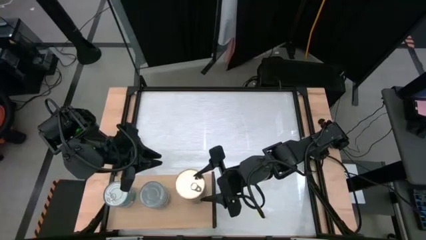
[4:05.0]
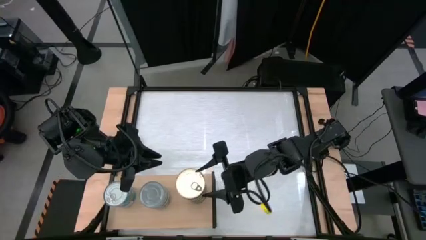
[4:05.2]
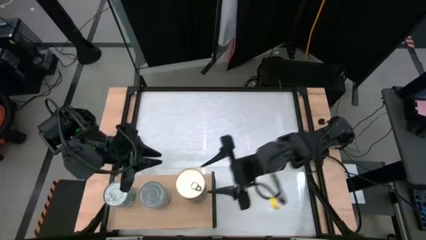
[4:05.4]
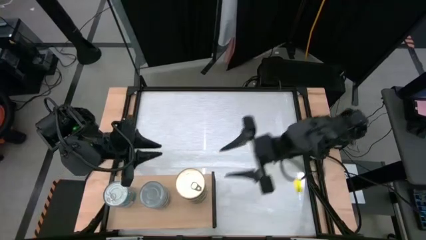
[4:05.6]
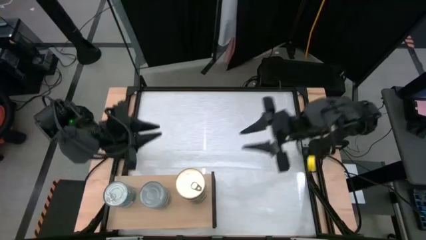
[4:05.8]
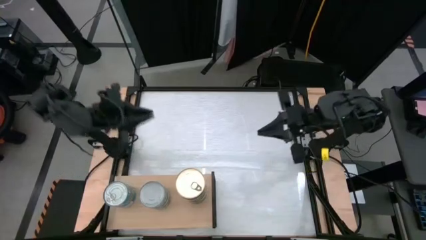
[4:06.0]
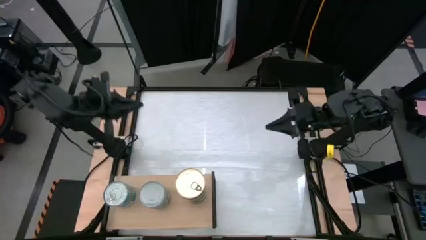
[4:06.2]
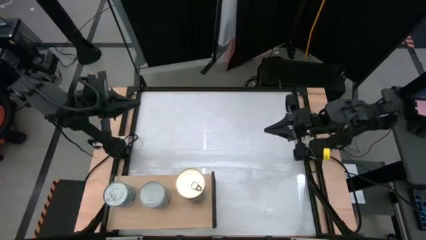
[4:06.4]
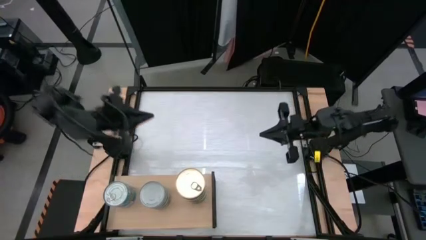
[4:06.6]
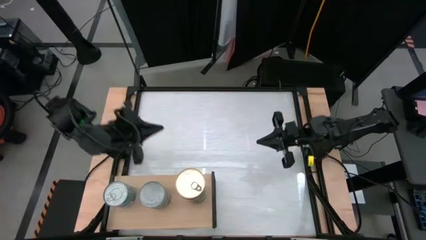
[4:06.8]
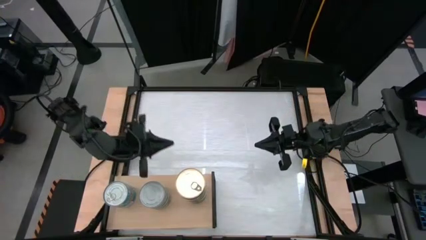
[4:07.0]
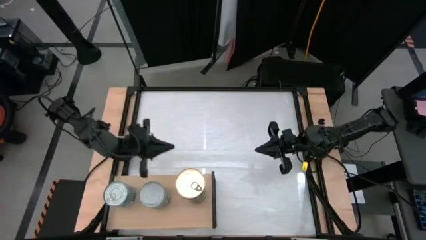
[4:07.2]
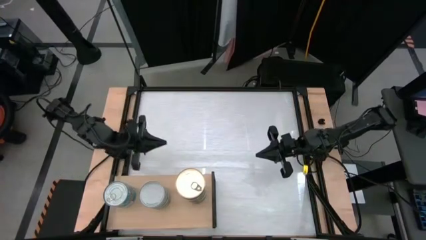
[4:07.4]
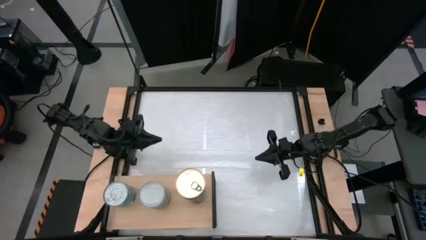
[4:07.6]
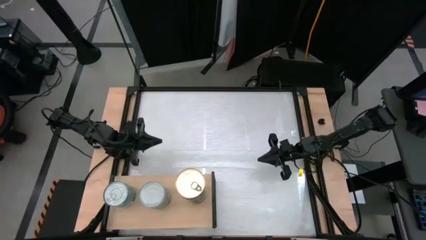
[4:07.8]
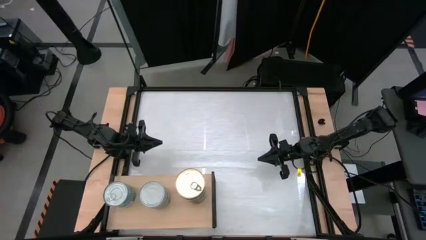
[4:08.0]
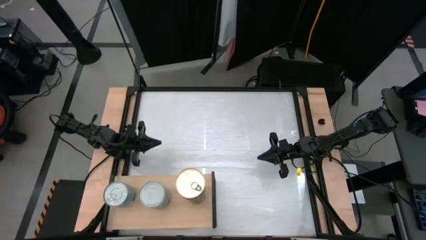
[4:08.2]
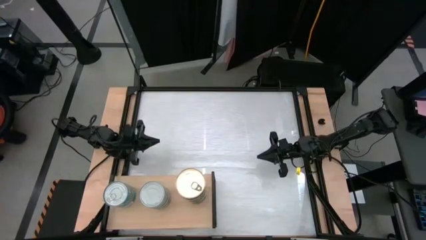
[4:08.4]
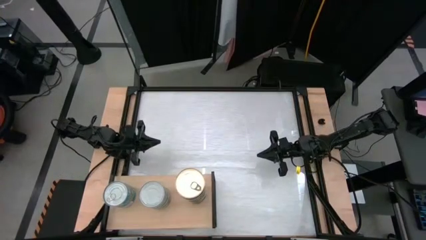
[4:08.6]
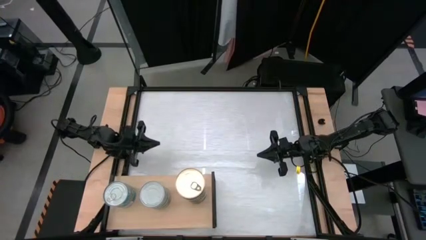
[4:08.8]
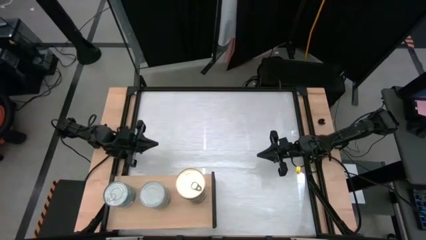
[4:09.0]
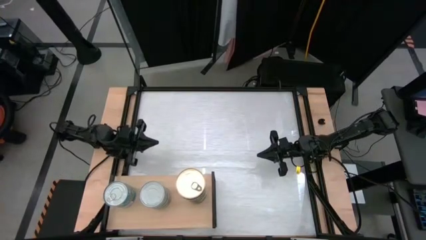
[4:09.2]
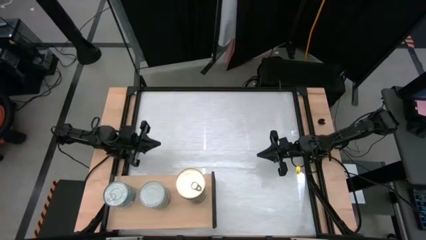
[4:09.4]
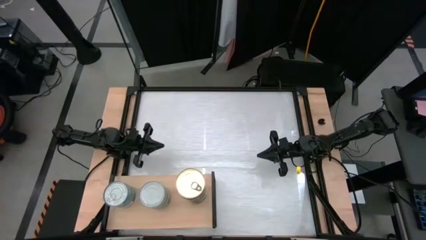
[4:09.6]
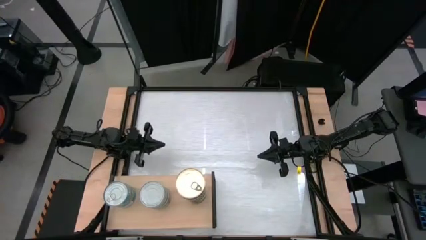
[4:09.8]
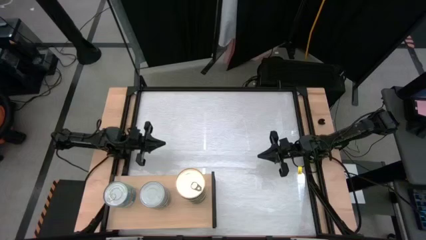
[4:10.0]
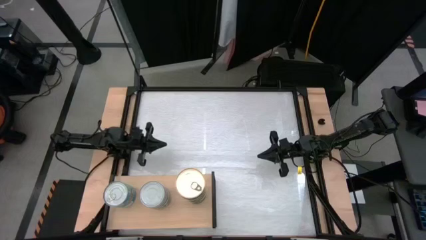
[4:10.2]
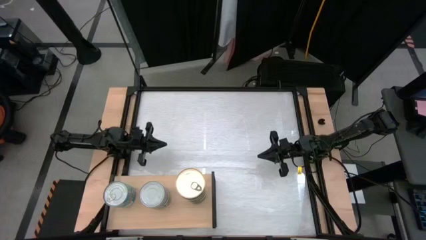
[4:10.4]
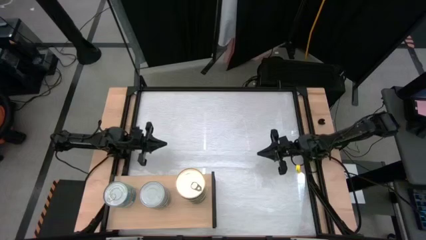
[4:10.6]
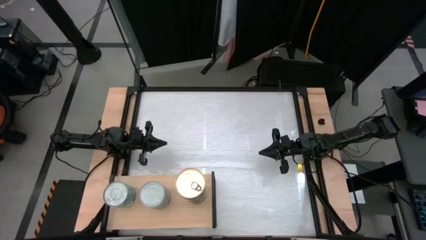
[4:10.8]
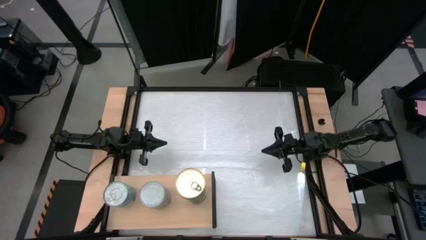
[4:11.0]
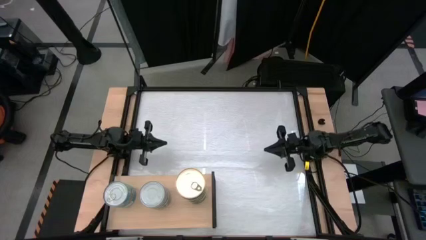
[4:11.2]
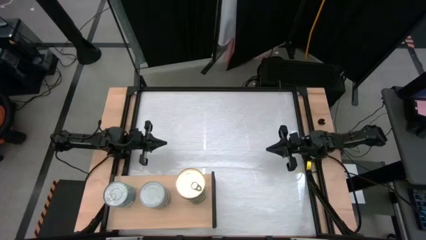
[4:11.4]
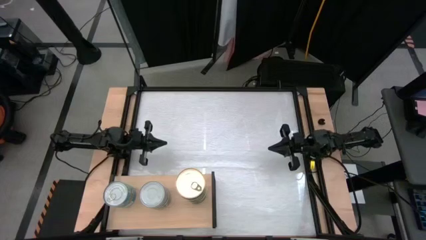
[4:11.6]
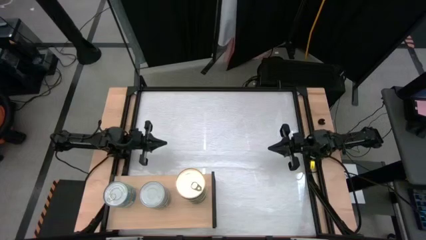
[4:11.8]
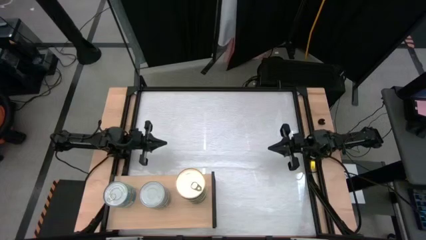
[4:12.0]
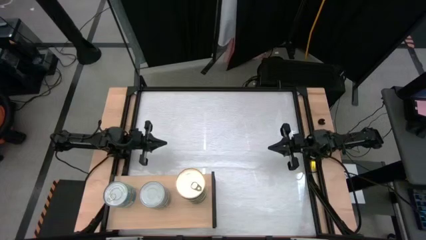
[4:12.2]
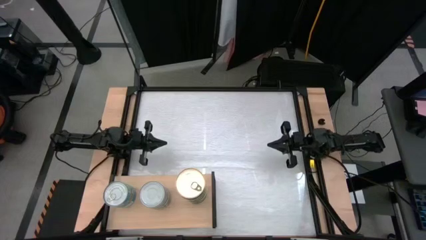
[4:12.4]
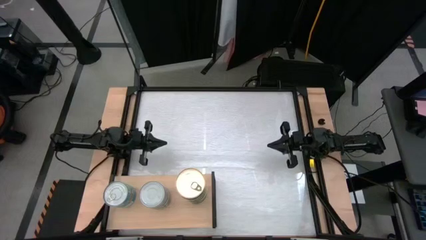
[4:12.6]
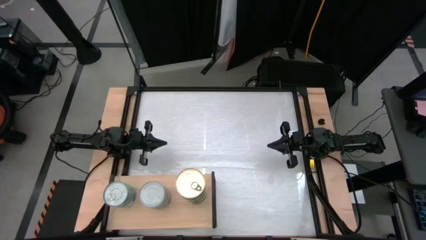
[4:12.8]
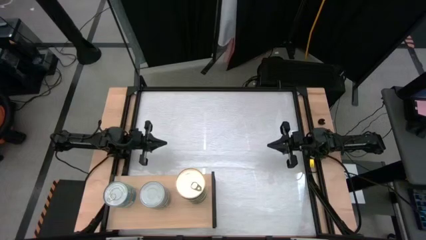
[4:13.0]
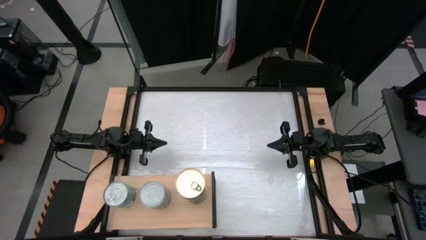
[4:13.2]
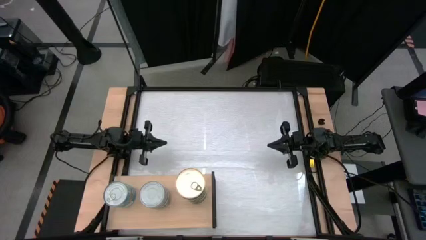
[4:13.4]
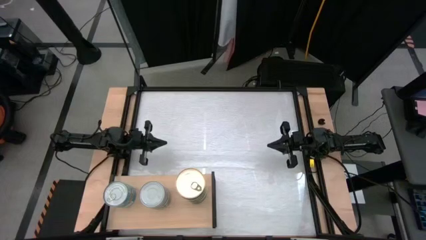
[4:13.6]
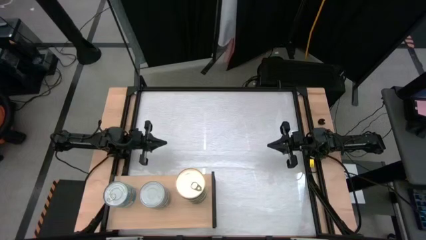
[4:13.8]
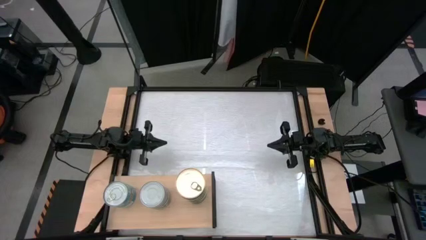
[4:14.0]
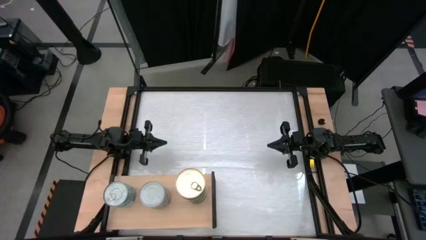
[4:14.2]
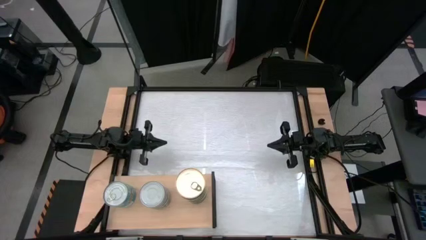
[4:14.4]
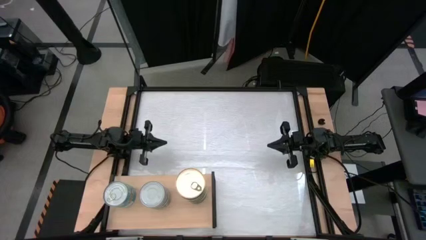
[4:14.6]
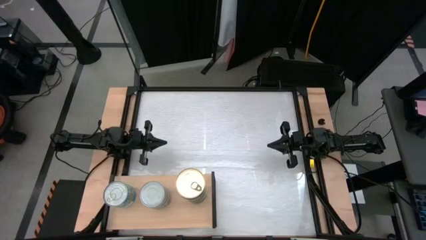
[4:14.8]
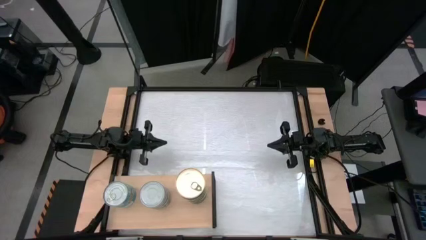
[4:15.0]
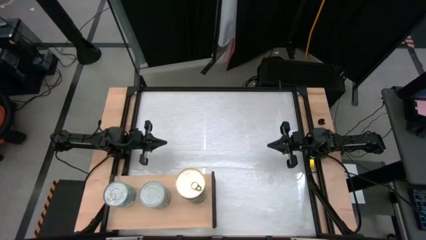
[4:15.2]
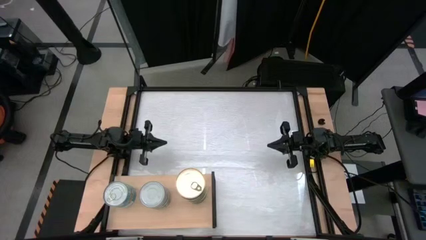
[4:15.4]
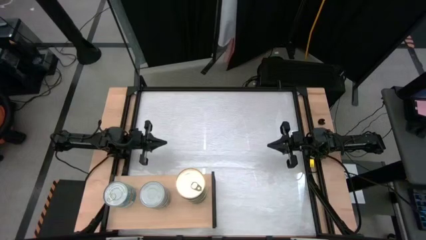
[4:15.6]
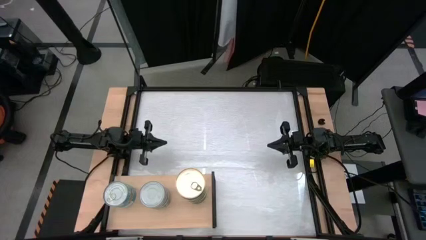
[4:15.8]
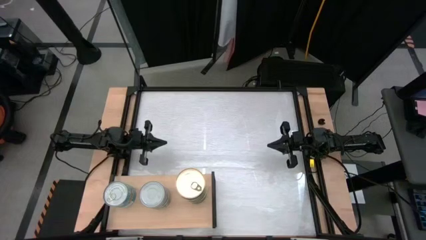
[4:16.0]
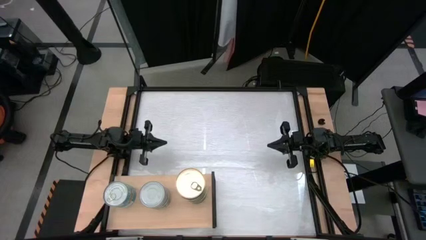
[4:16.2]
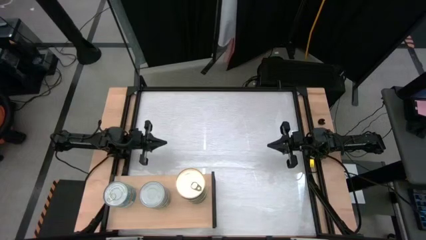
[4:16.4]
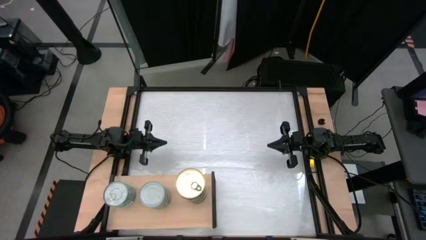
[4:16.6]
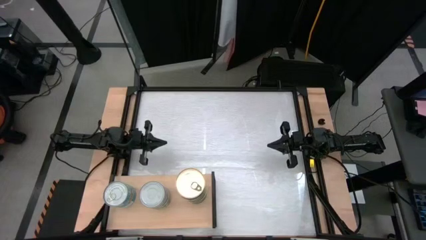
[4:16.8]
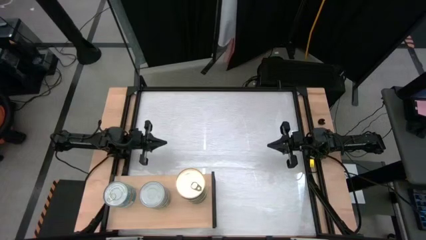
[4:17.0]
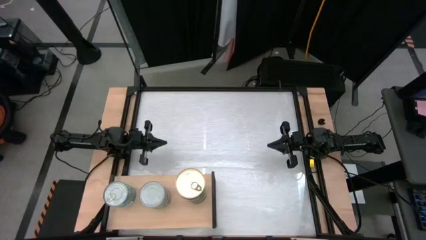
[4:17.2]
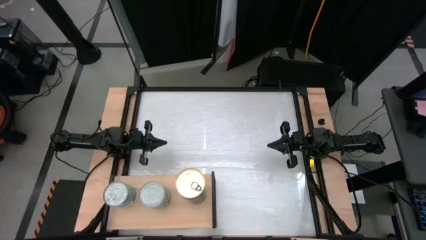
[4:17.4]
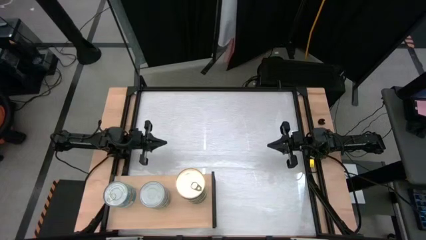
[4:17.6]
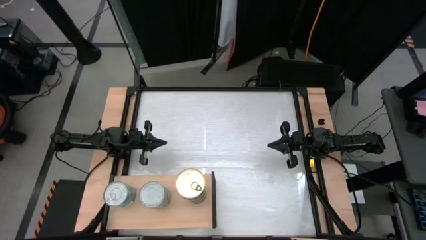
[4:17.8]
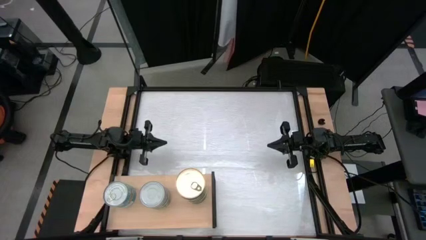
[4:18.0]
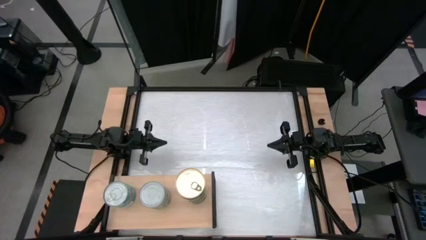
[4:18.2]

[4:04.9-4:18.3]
Task: Stack canned seafood by type on shelf
Return to Home Position

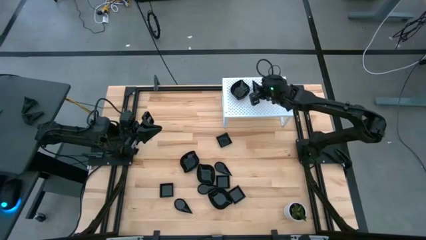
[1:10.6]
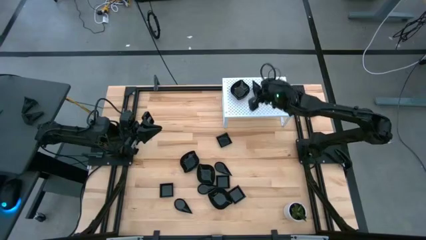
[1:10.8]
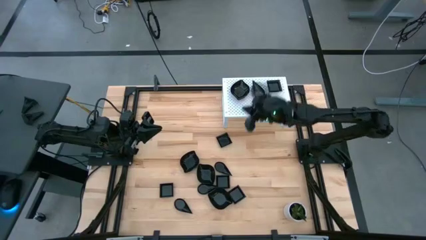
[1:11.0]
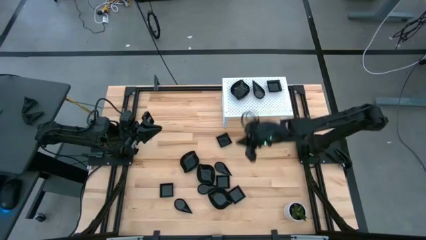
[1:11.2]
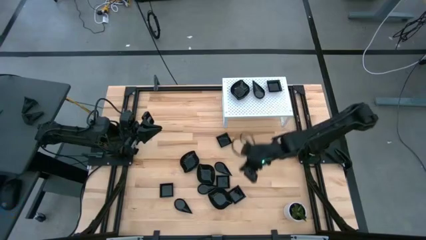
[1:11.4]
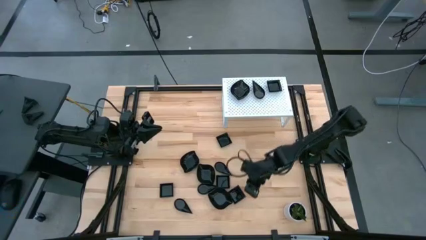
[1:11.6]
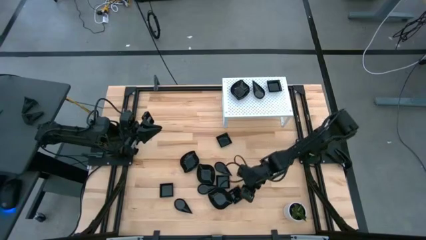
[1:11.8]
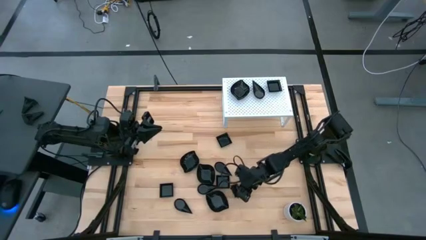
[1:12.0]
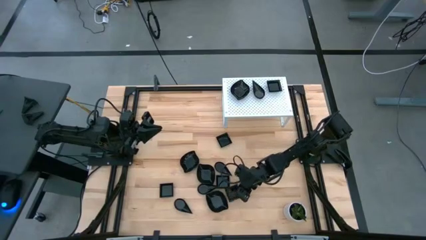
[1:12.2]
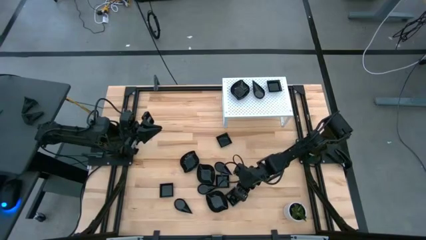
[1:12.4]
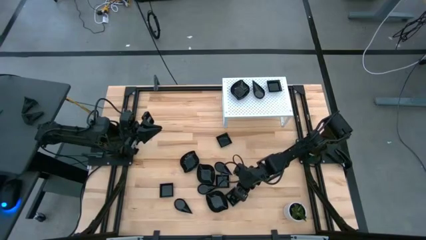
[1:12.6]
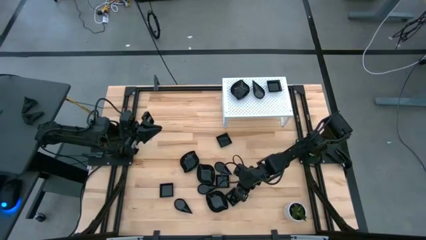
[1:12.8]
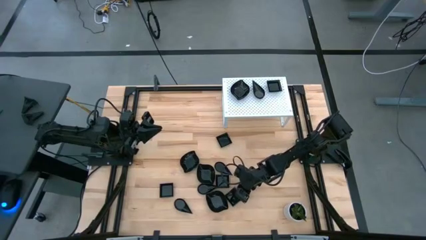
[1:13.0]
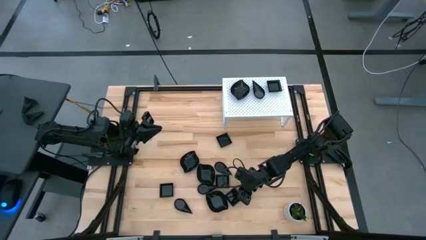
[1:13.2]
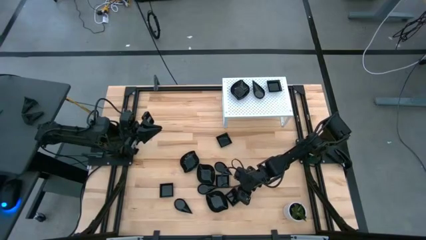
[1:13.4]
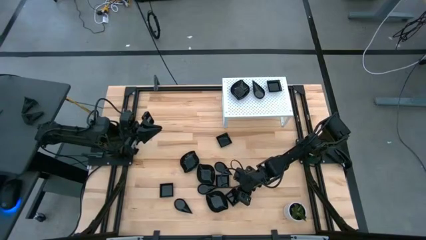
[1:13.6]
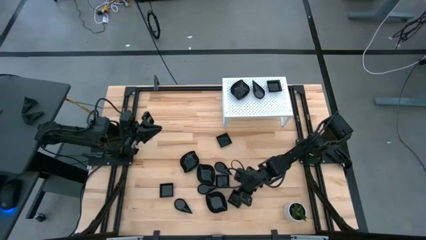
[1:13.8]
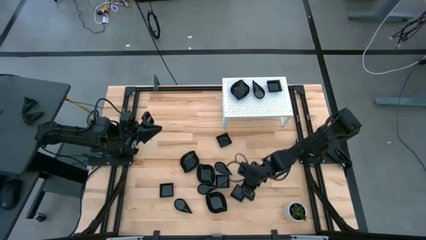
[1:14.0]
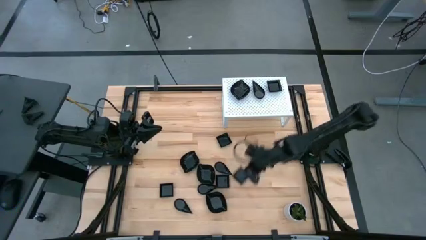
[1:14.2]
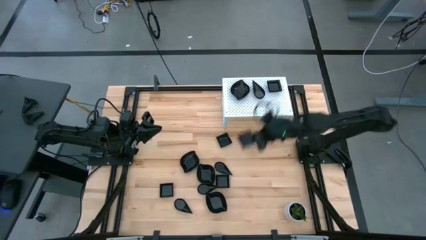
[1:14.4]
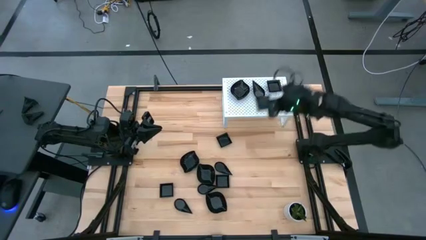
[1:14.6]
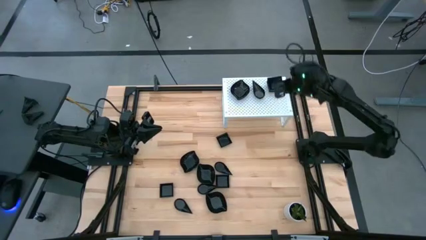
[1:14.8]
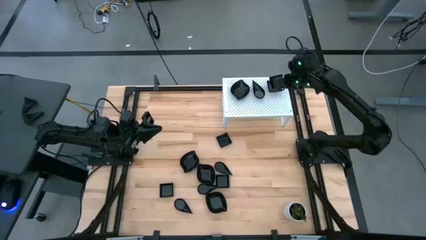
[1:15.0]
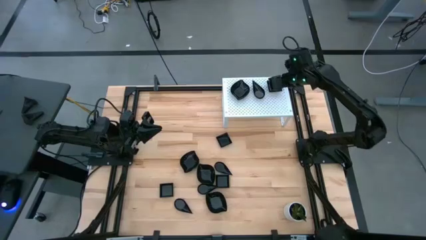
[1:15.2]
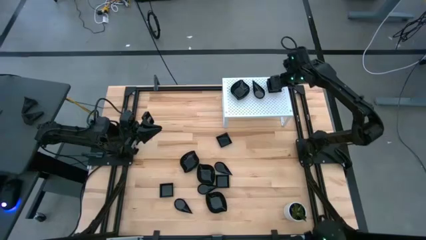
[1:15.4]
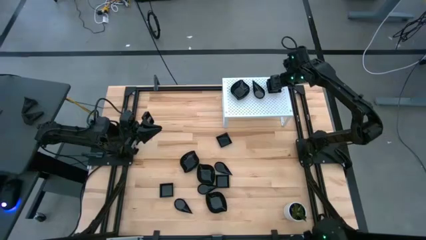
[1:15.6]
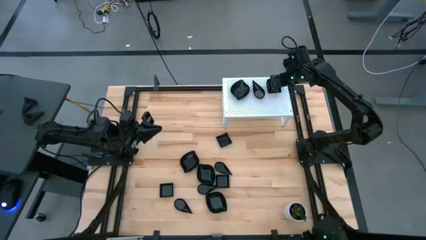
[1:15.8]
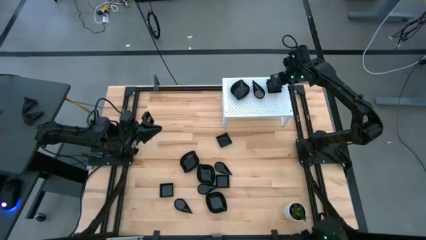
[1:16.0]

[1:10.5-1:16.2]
Task: Pick & Place Mini shaped plates
Stack the square plate on top of the square plates on the shelf
